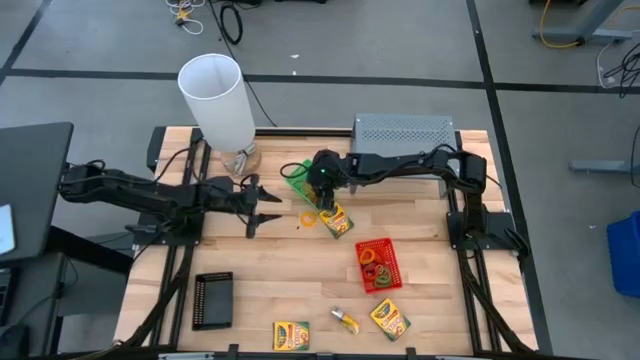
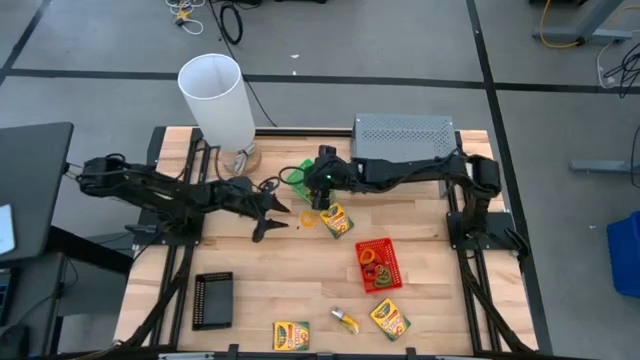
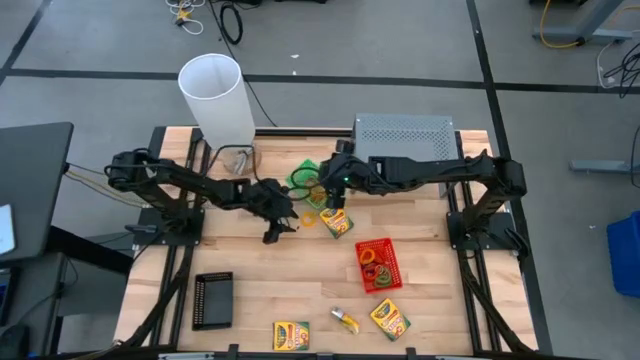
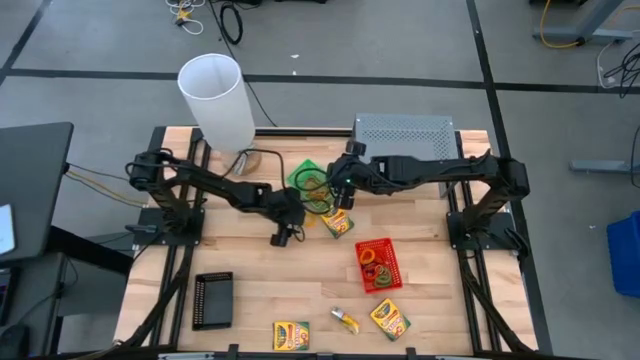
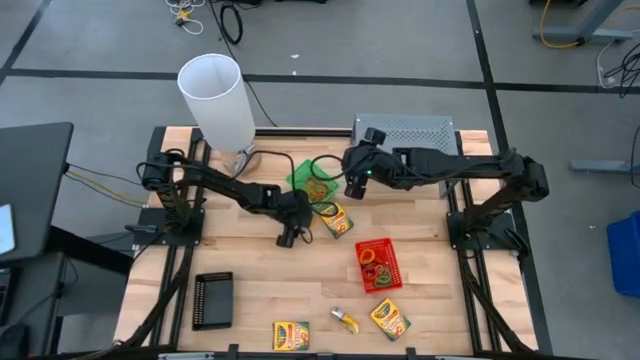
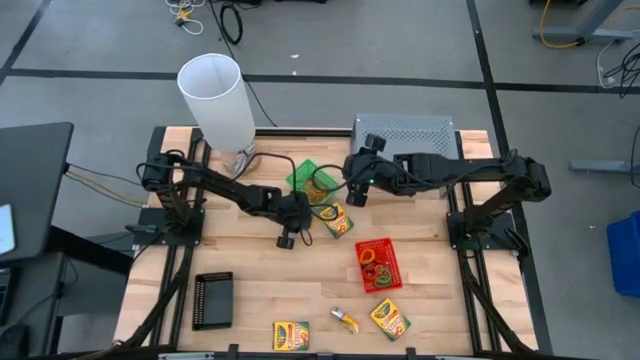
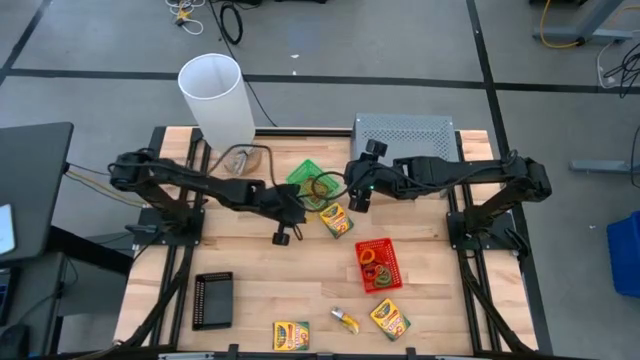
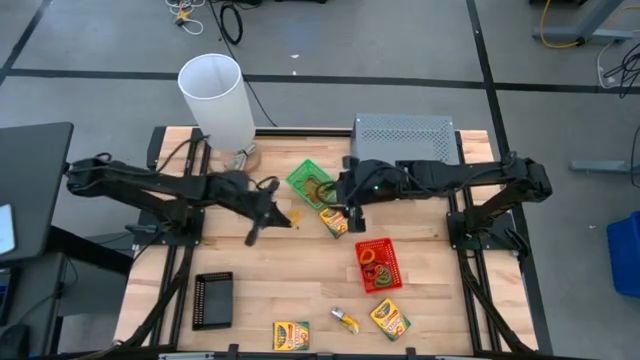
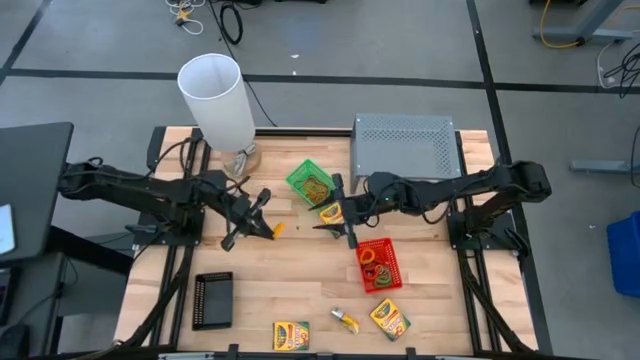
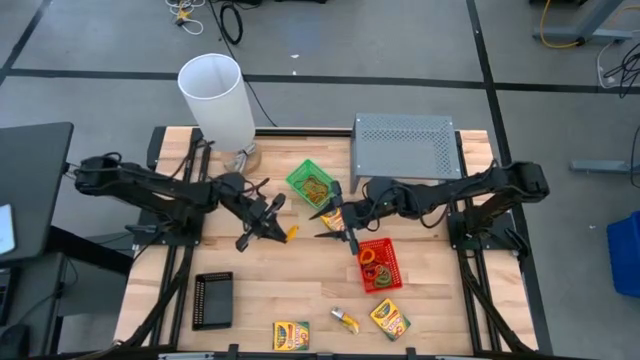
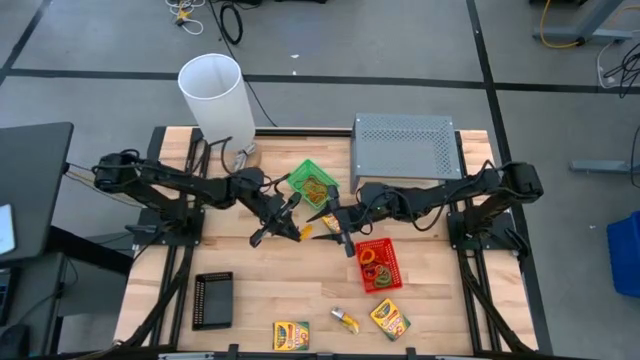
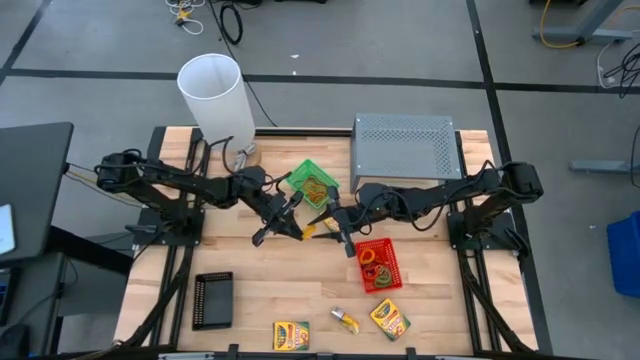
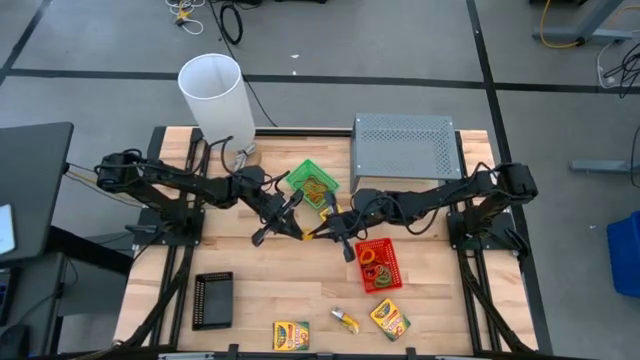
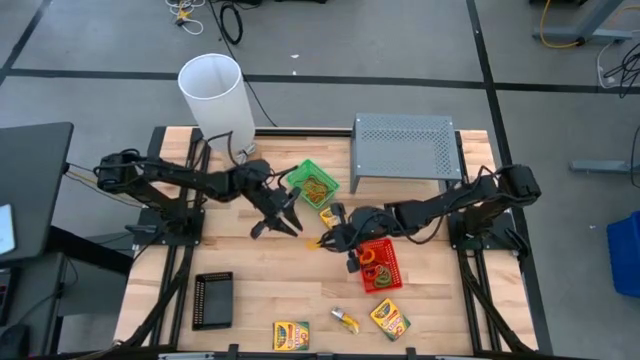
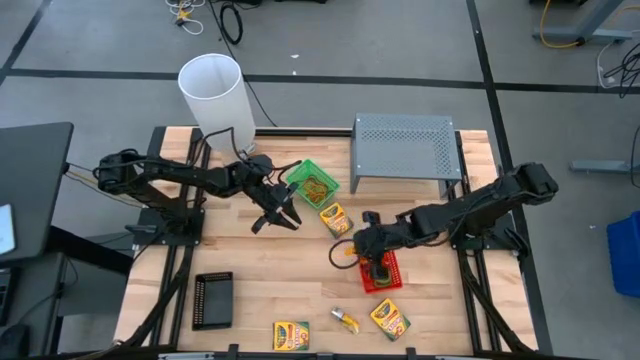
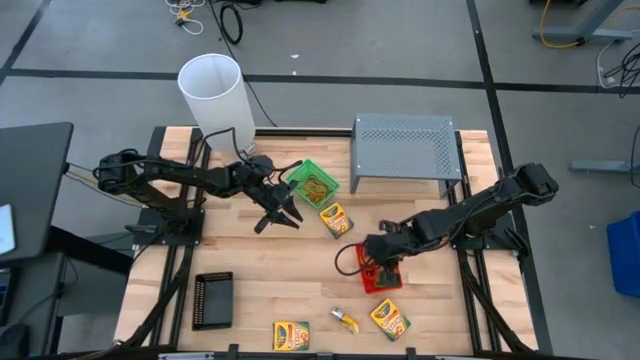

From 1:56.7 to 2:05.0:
Task: Pick & Place Office Desk Supplies
Put the yellow spring keychain into the red bin

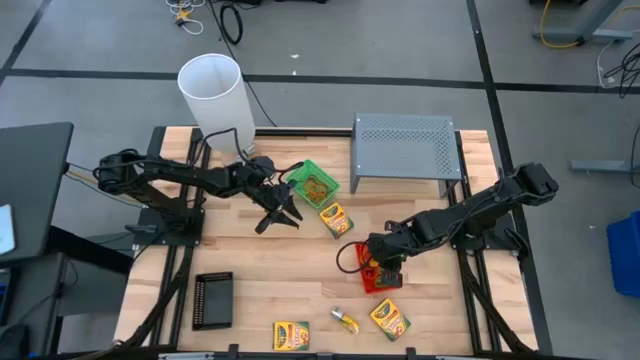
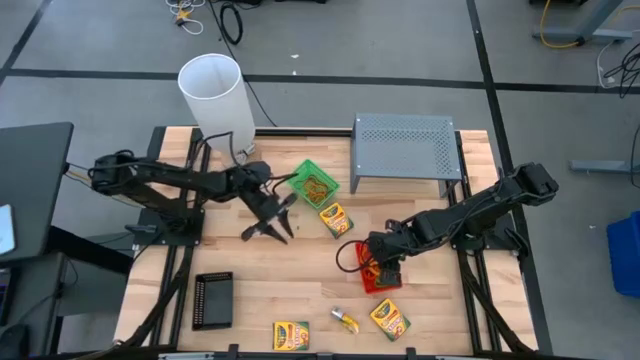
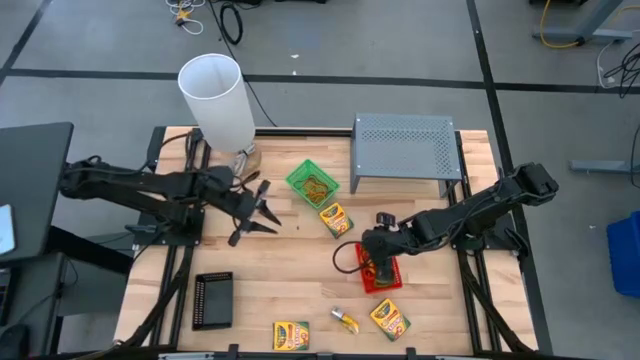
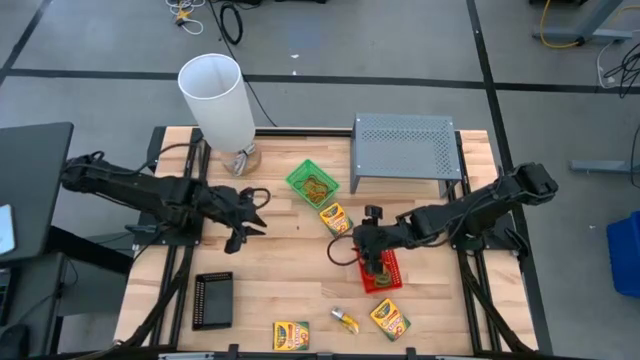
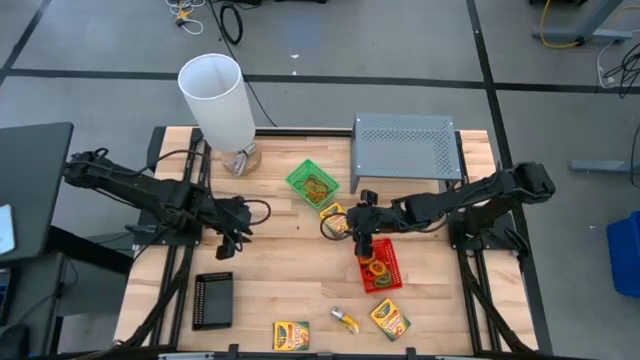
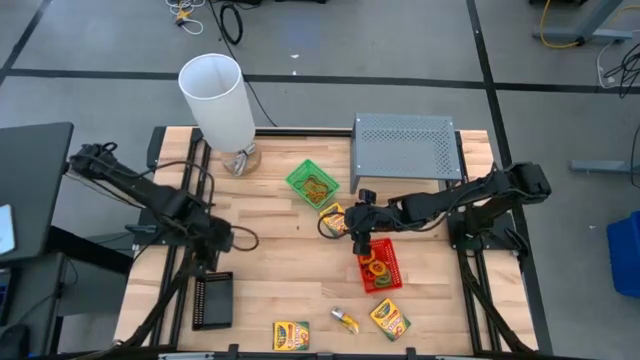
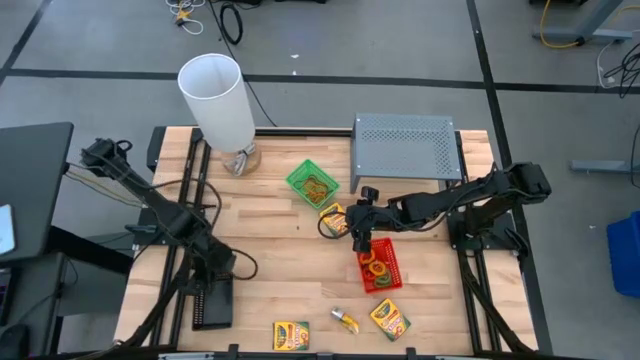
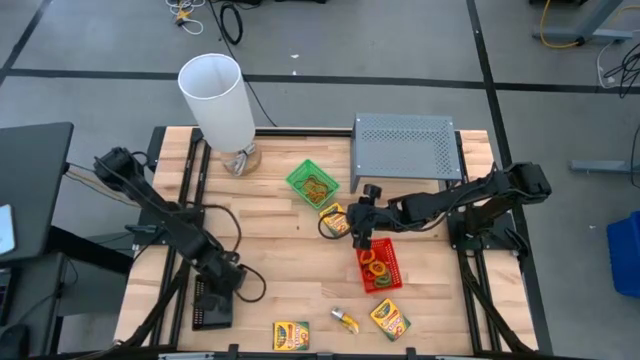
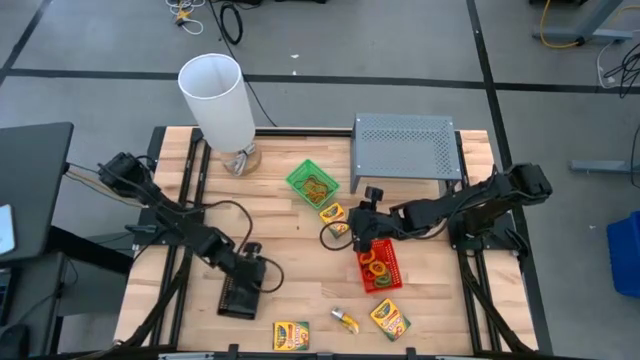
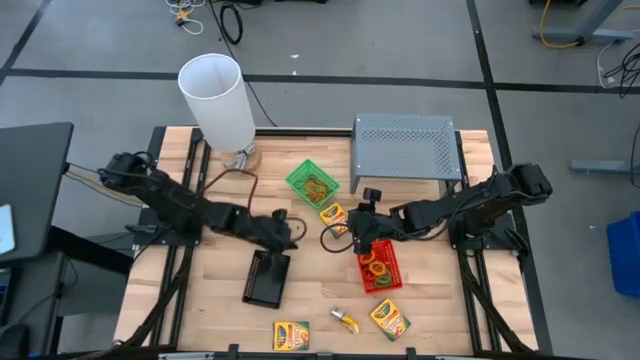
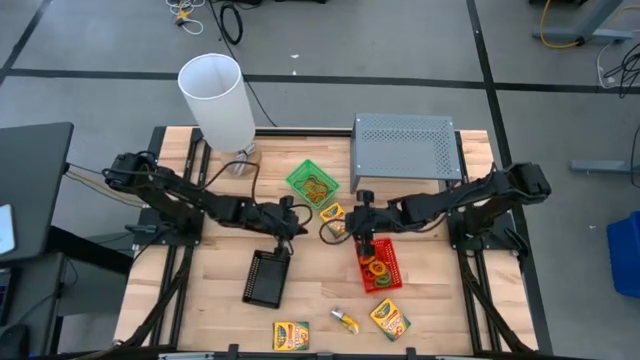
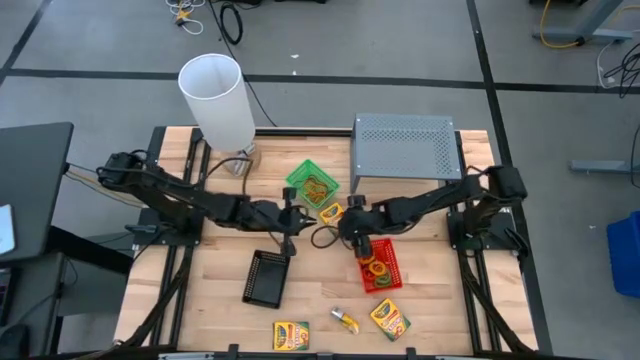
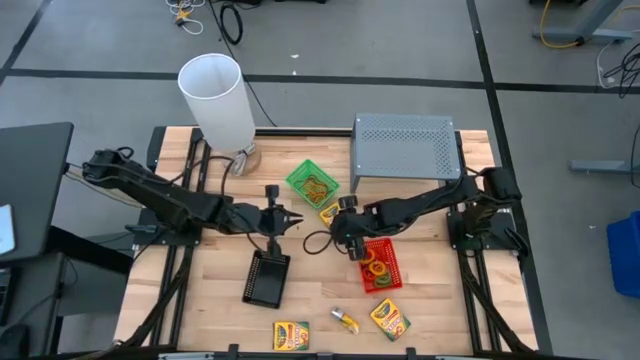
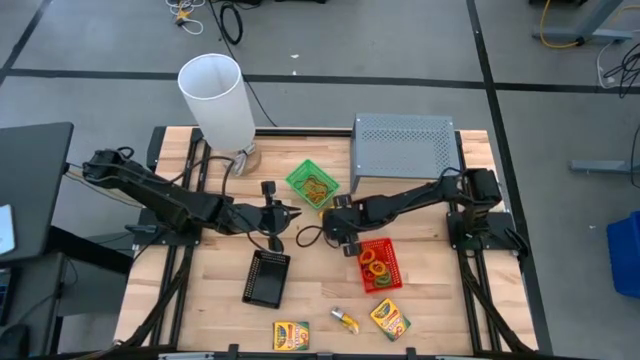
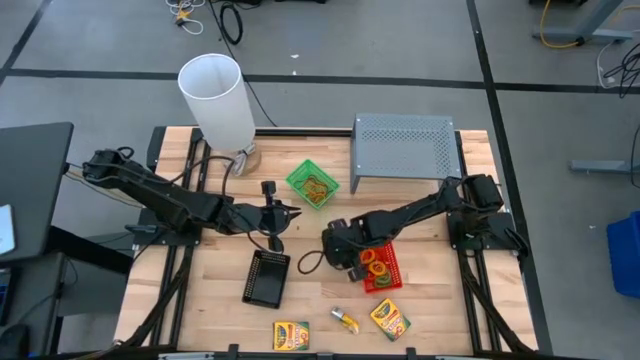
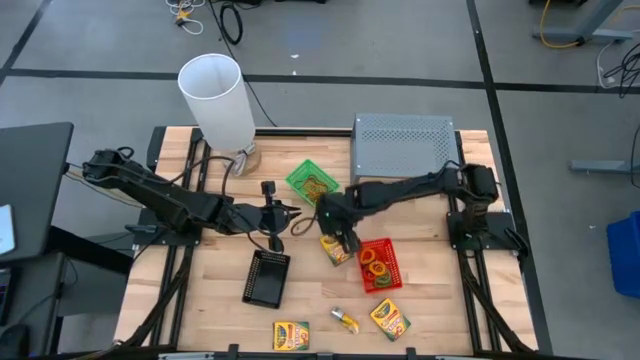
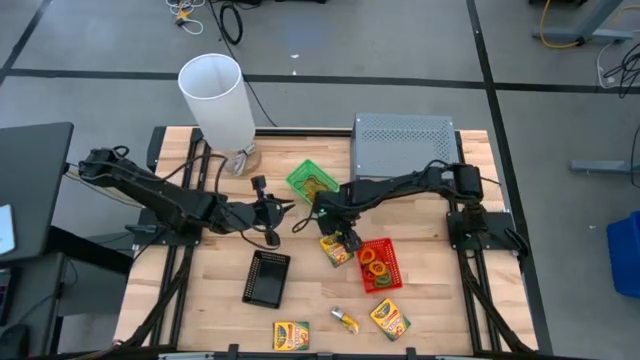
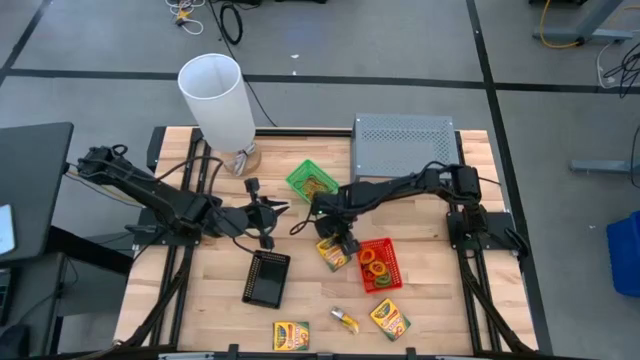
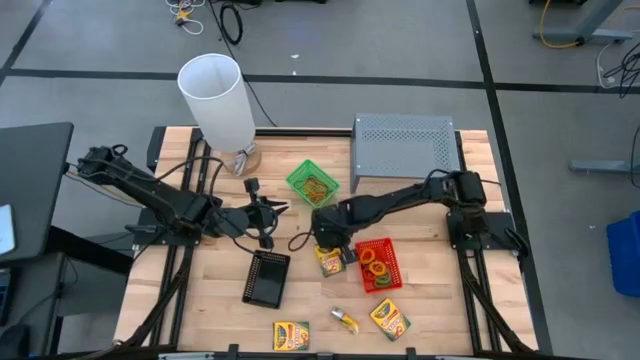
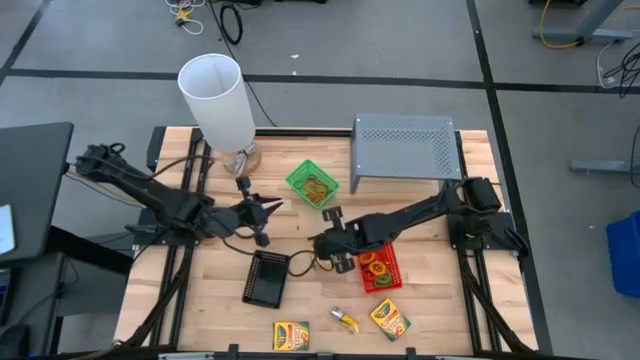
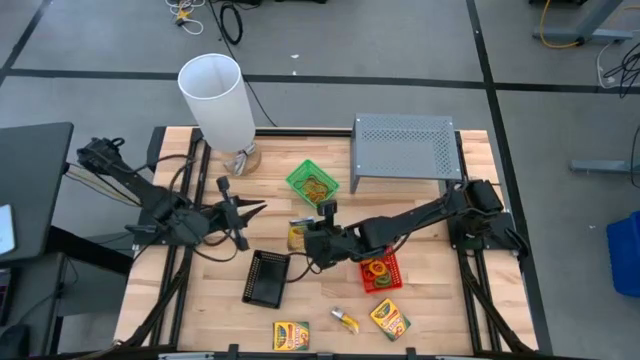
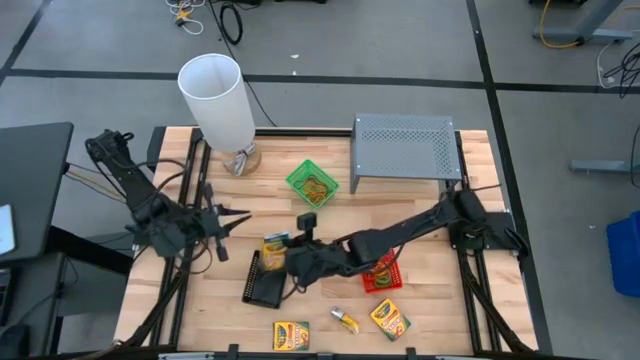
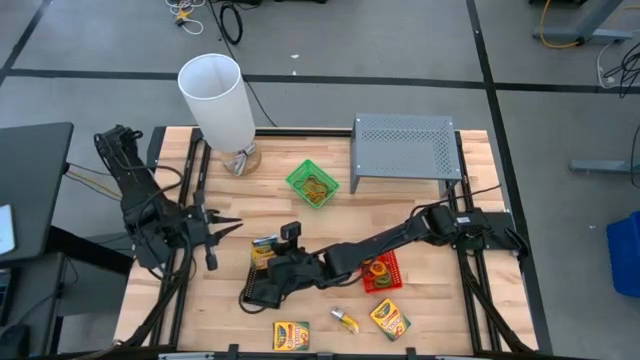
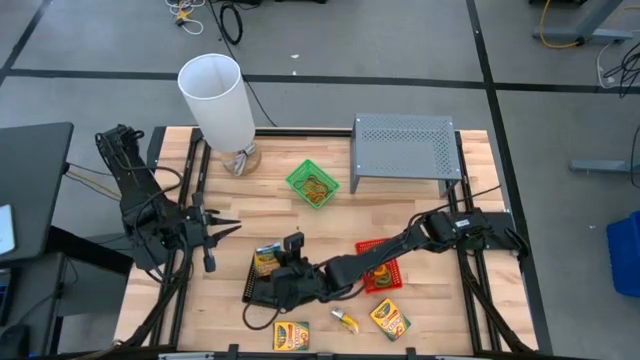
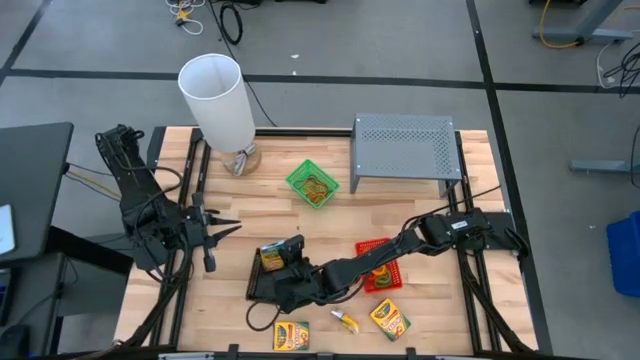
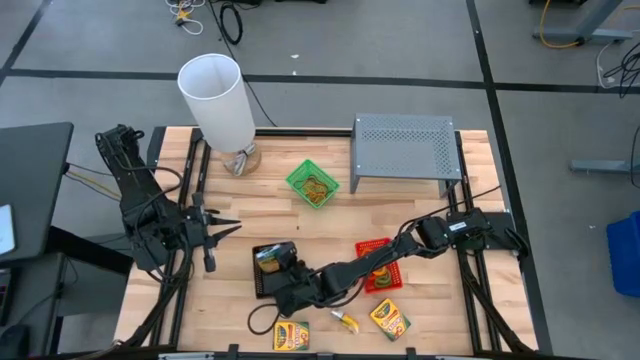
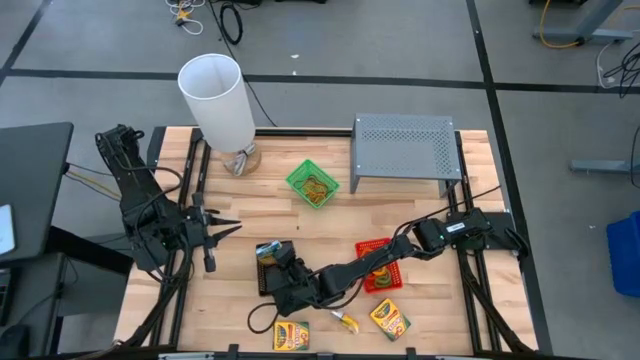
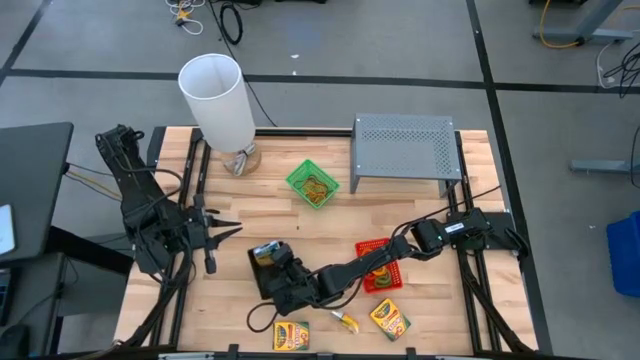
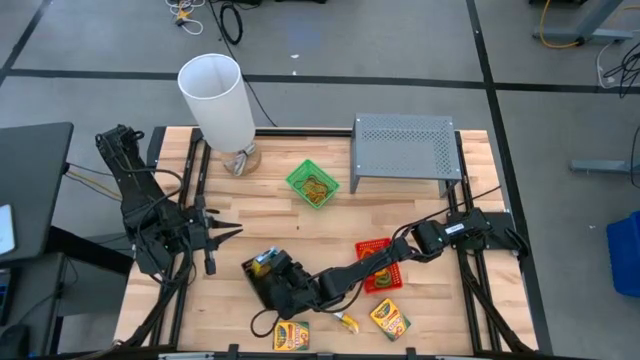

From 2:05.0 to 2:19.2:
Put the yellow crayon box into the black bin
